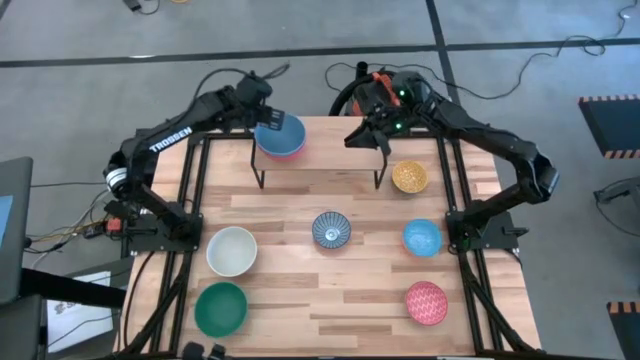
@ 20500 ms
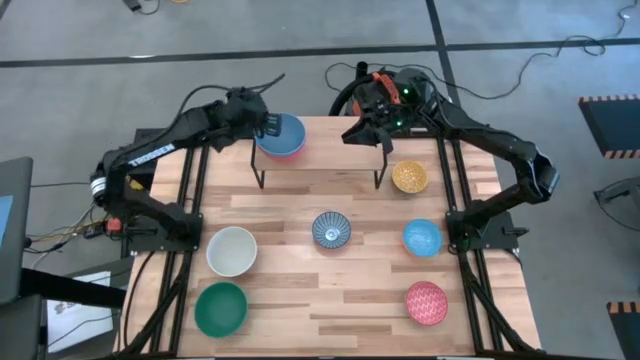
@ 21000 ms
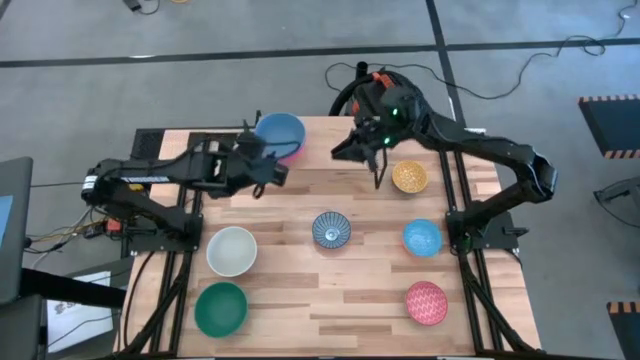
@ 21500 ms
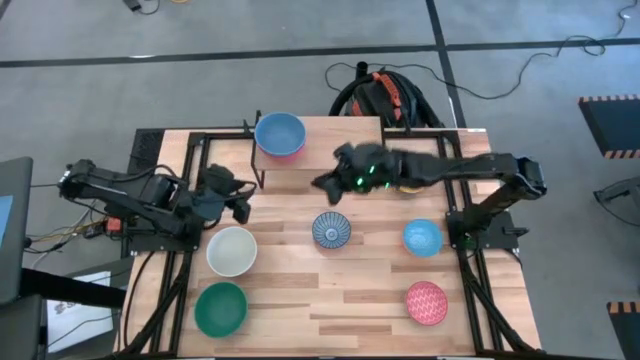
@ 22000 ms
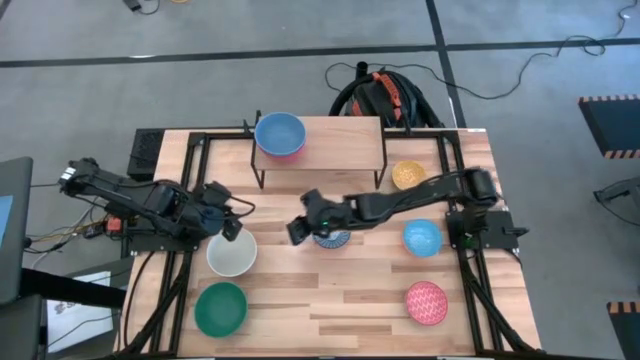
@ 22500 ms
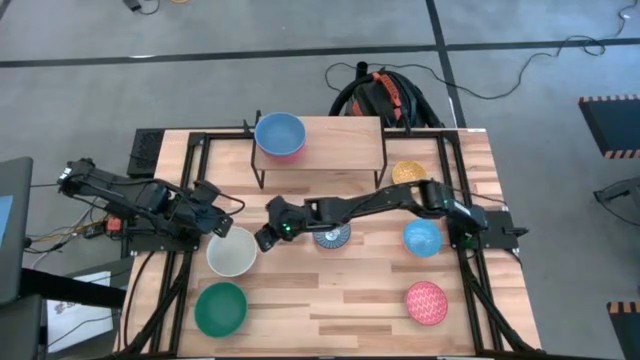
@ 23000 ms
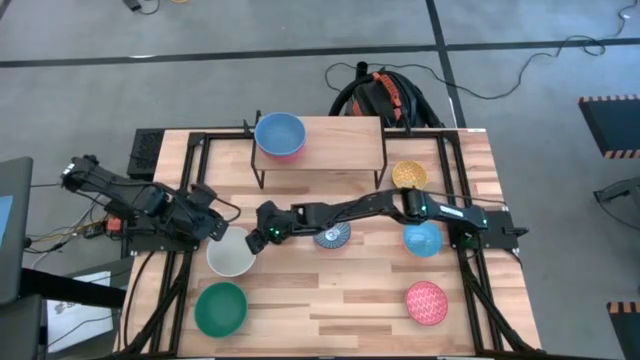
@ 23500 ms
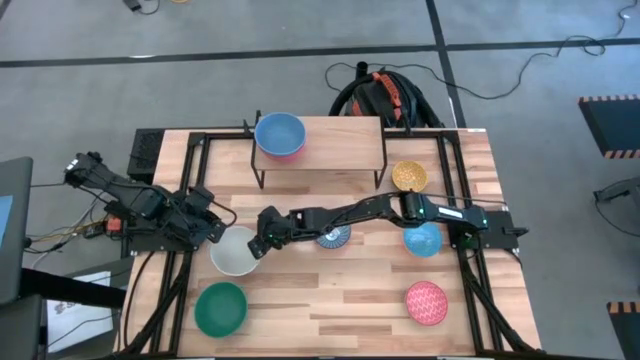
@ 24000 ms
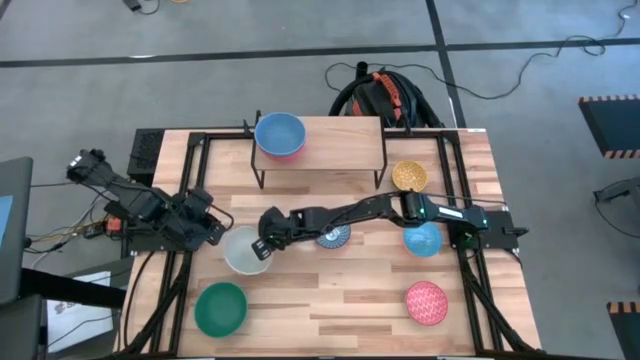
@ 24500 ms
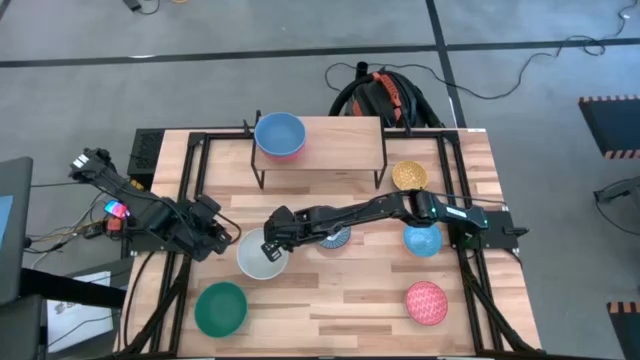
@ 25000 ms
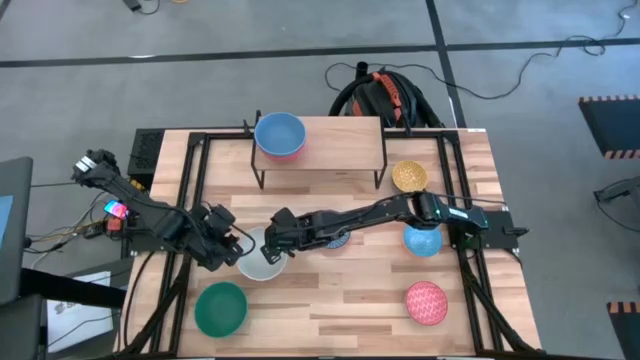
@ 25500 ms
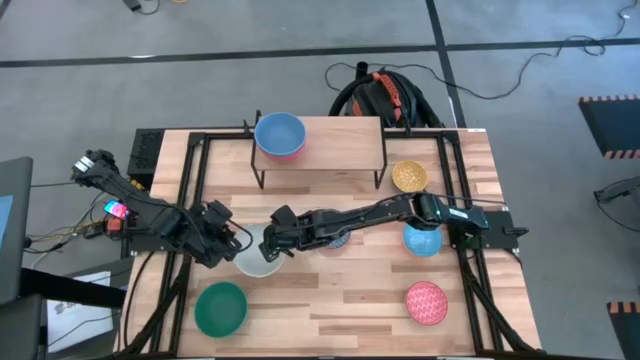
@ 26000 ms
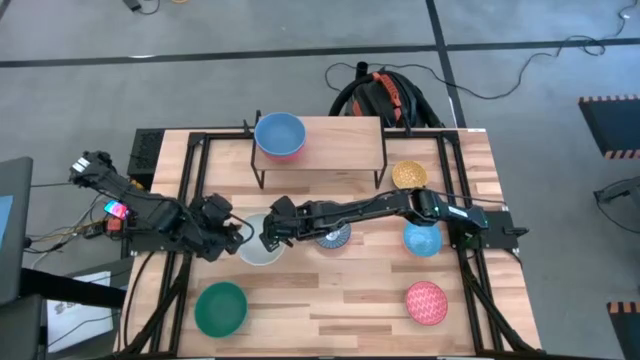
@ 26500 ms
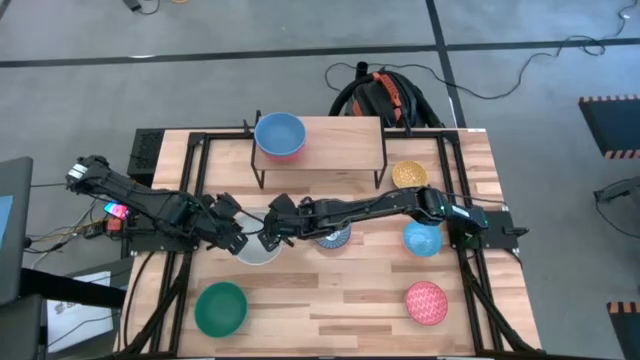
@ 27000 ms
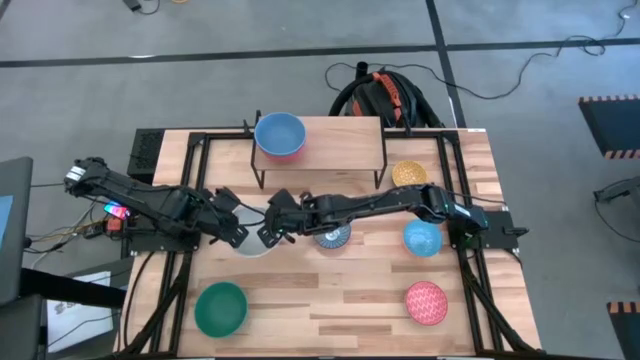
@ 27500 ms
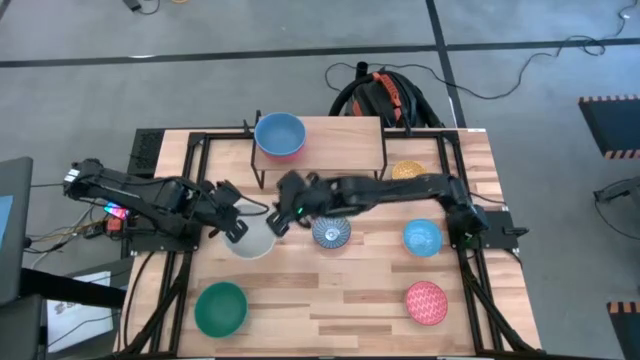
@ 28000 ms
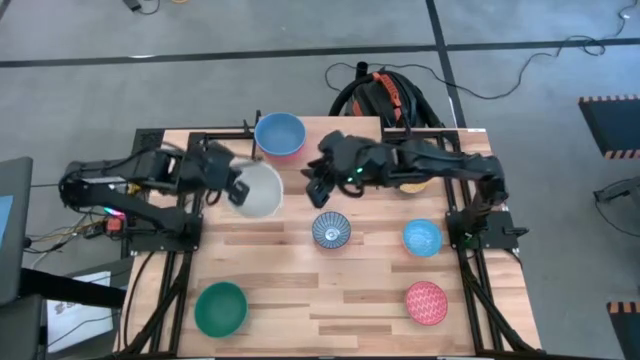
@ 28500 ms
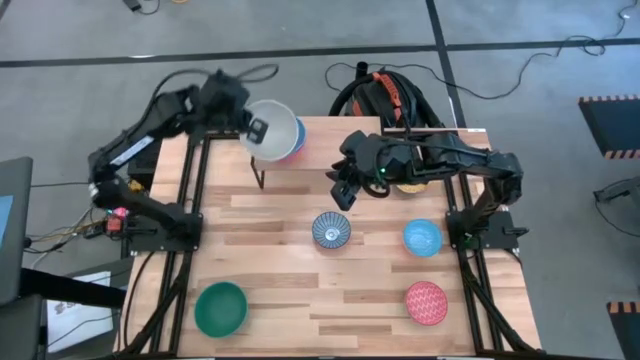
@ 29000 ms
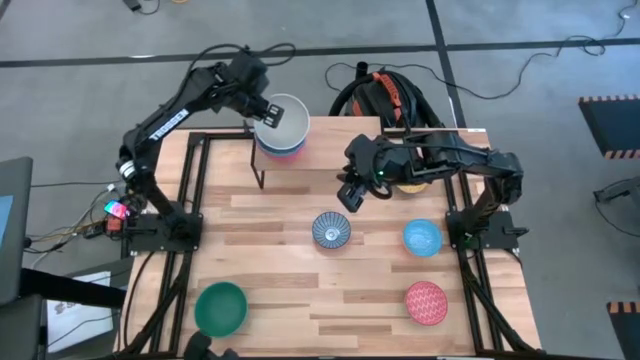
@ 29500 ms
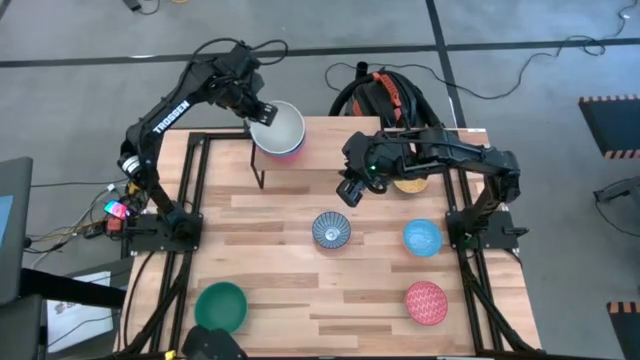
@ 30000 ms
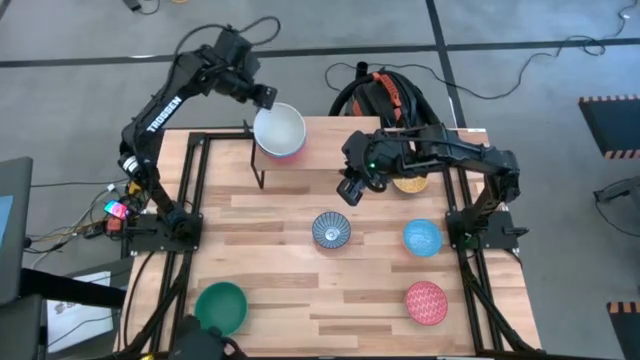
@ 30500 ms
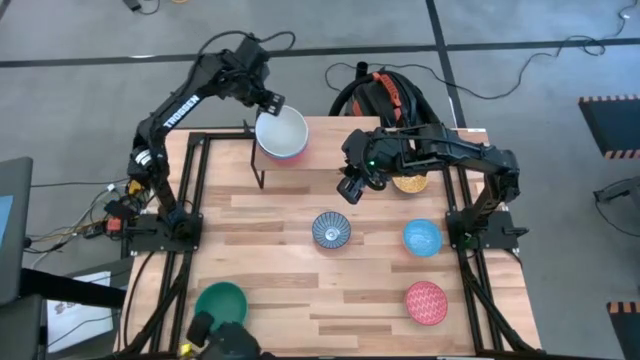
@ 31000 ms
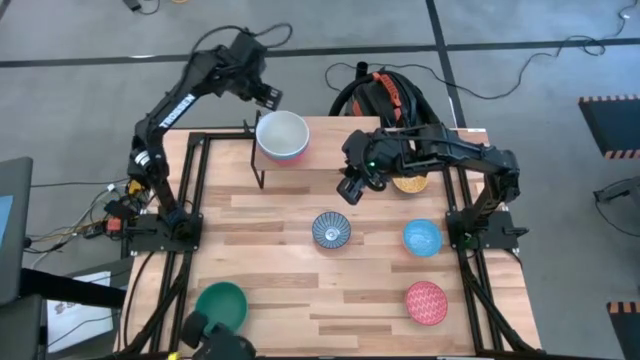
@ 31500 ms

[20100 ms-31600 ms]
Task: Place and stack bowls onto a shelf
Stack the white bowl on top of the blue bowl on the shelf

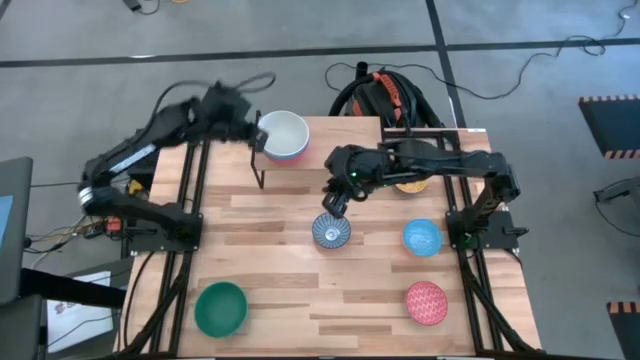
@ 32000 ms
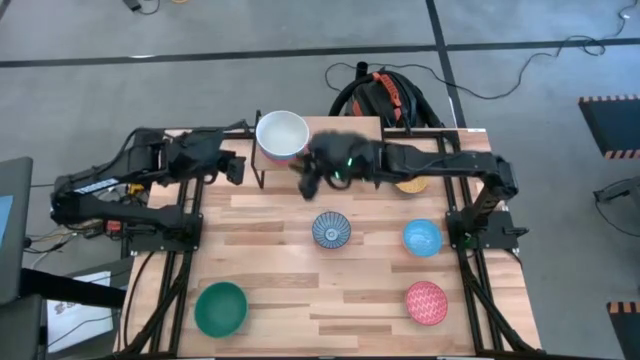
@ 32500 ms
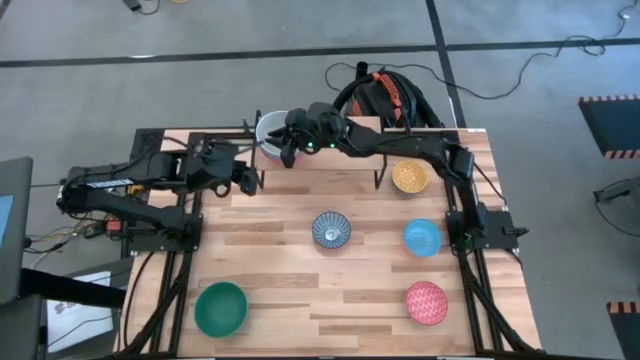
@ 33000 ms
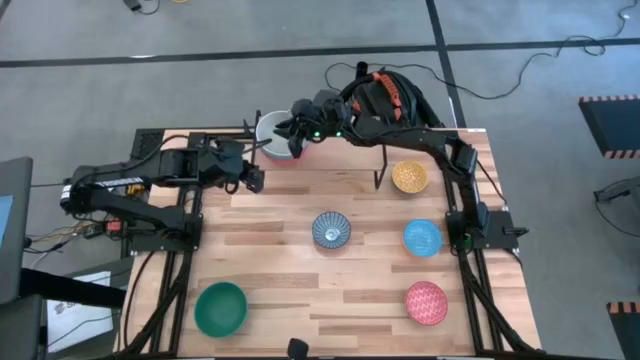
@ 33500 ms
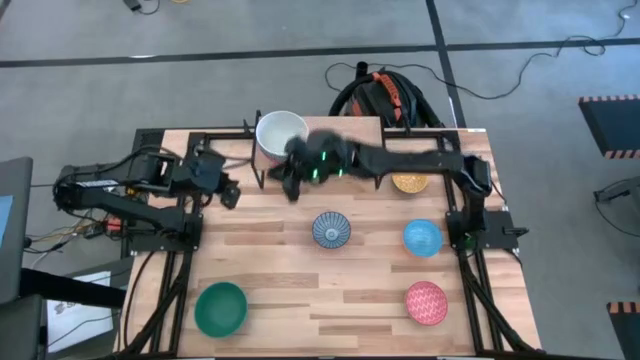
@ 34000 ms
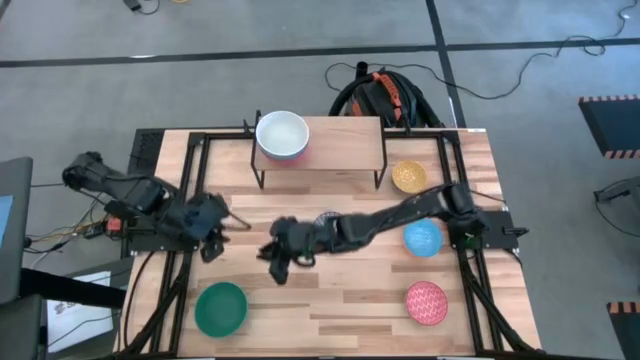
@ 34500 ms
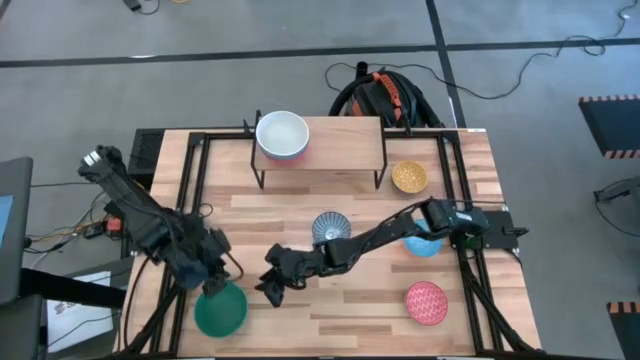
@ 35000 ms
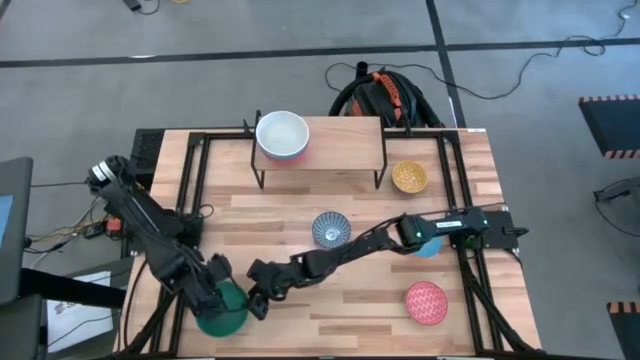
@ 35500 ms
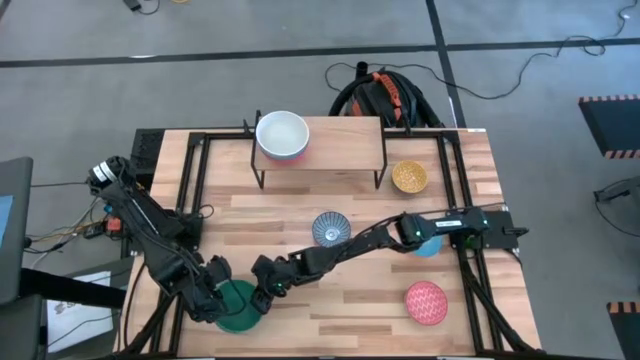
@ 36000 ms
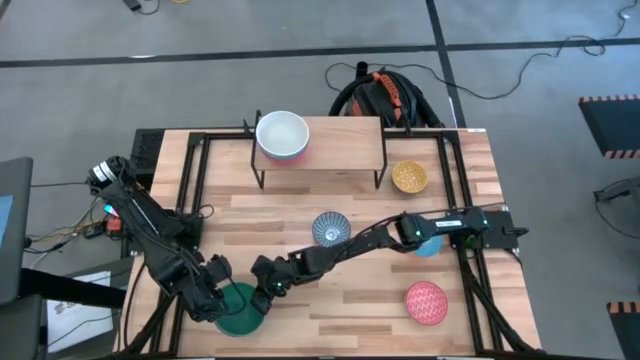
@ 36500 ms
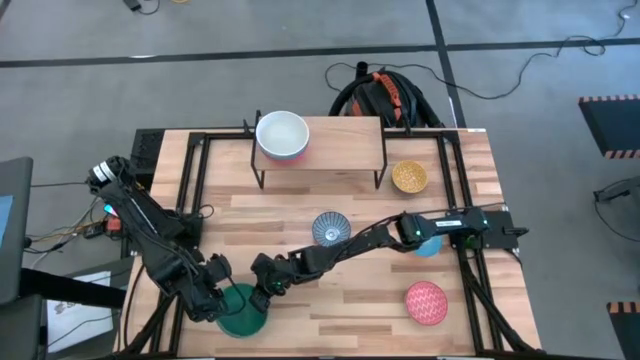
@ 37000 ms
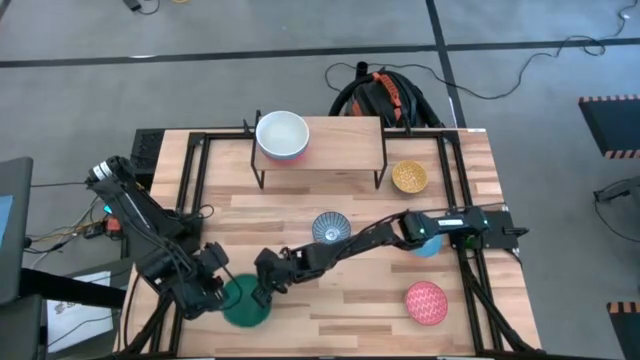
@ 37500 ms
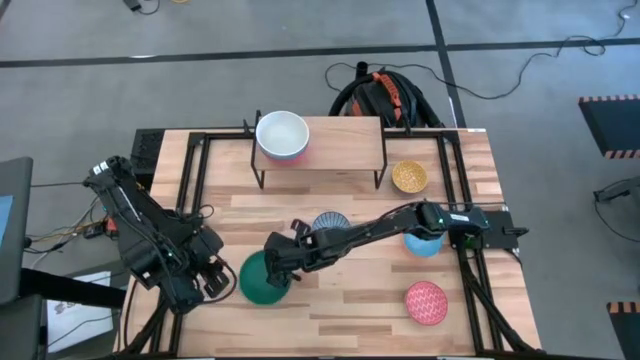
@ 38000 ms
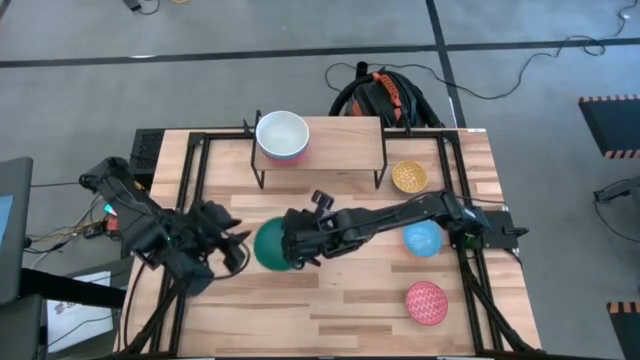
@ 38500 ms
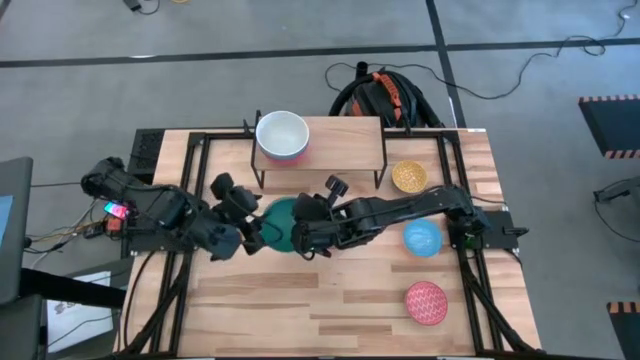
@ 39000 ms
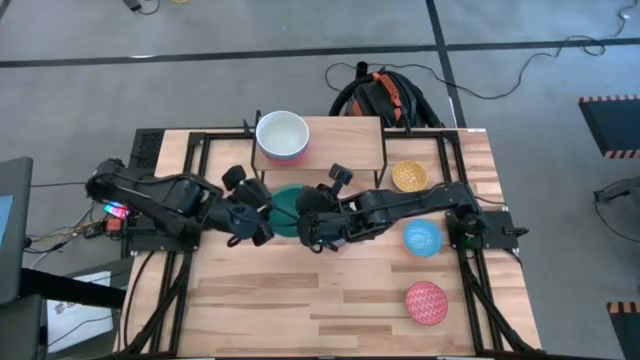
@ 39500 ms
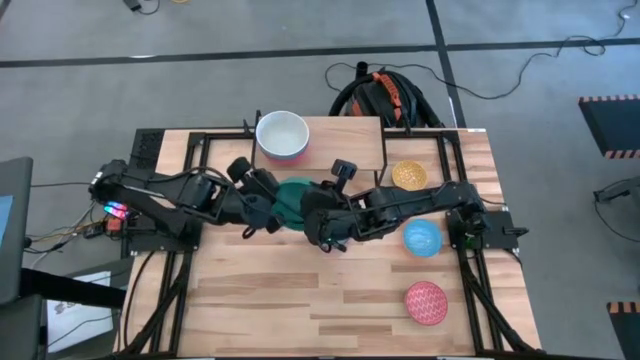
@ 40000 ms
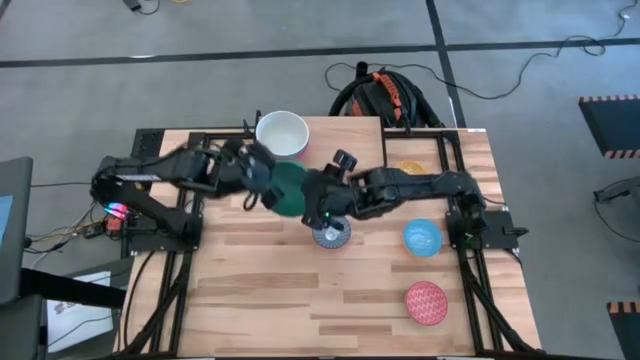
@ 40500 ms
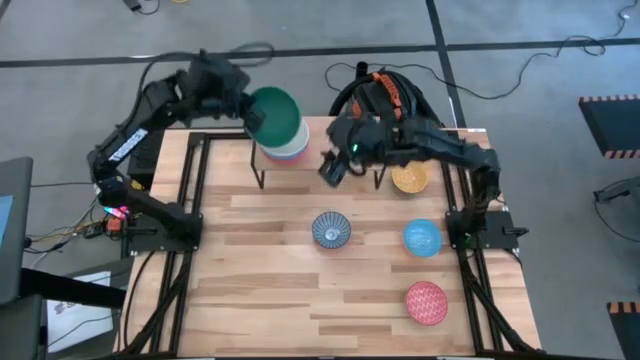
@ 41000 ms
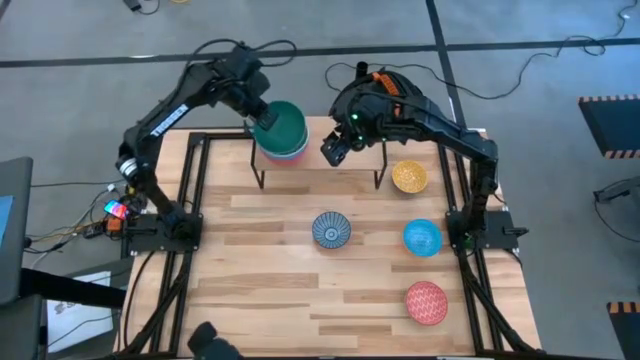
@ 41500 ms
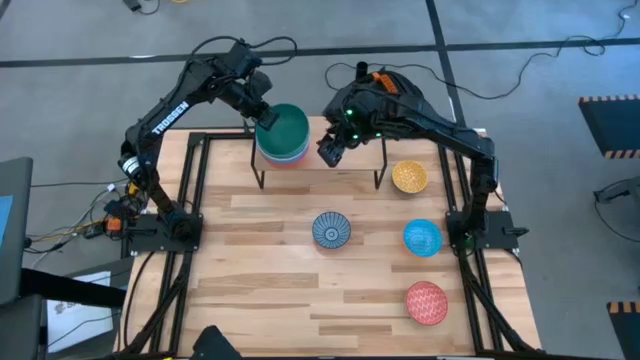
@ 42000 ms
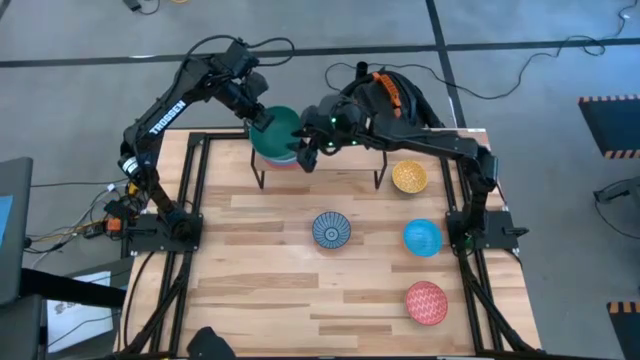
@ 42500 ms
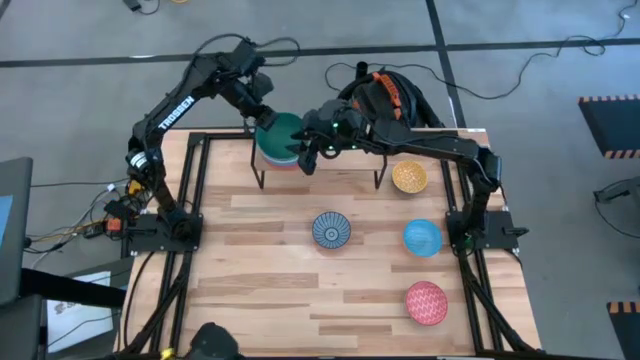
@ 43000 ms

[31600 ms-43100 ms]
Stack the green bowl on the top of the white bowl on the shelf
